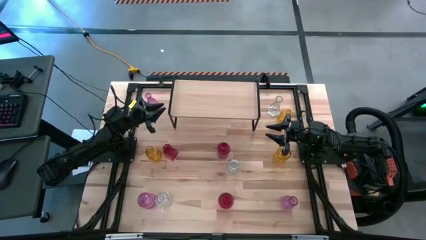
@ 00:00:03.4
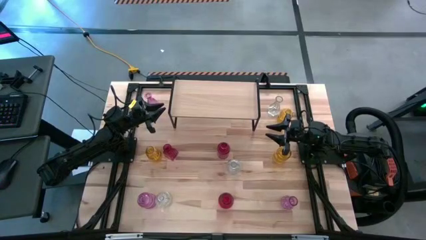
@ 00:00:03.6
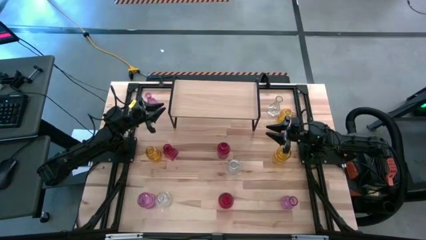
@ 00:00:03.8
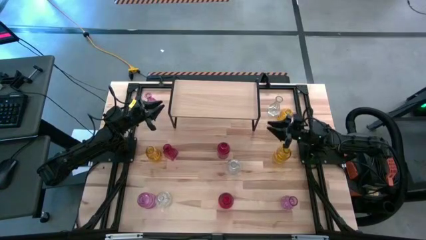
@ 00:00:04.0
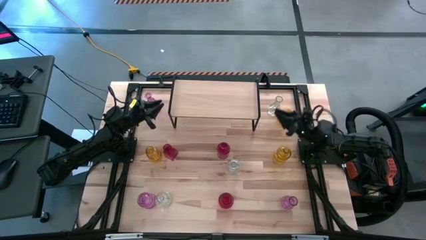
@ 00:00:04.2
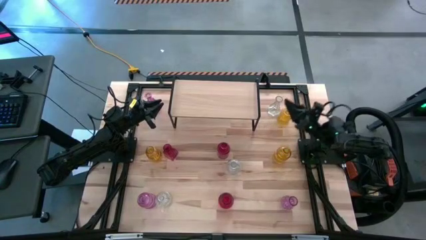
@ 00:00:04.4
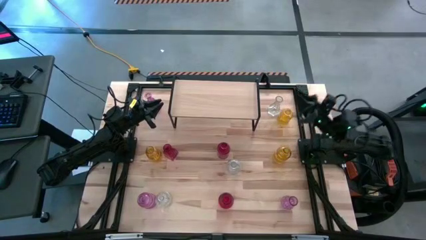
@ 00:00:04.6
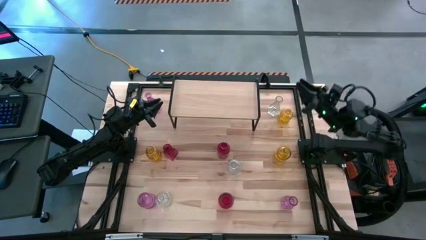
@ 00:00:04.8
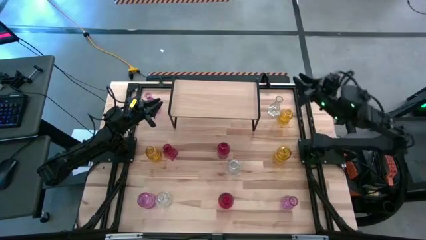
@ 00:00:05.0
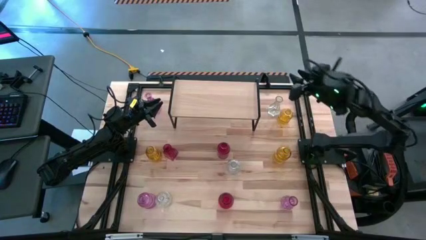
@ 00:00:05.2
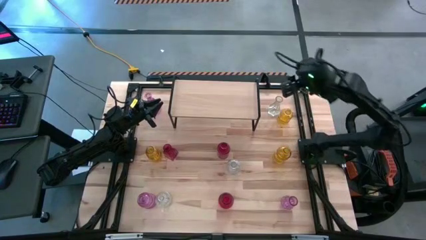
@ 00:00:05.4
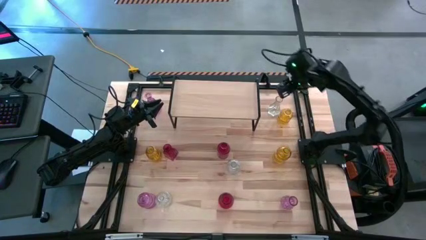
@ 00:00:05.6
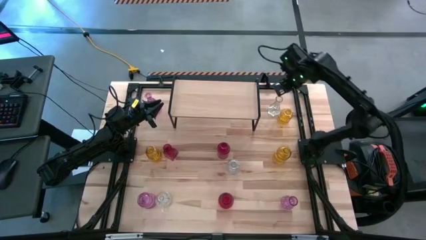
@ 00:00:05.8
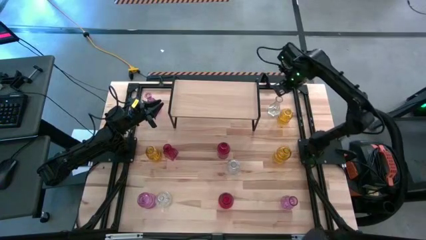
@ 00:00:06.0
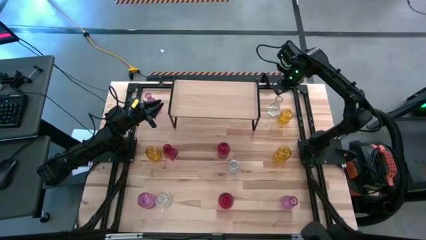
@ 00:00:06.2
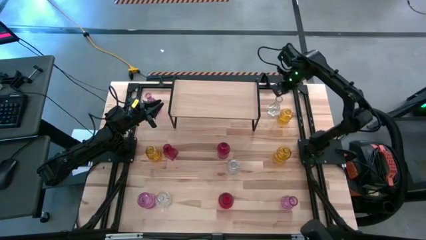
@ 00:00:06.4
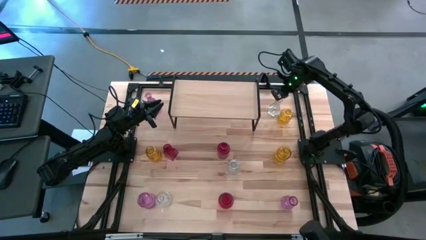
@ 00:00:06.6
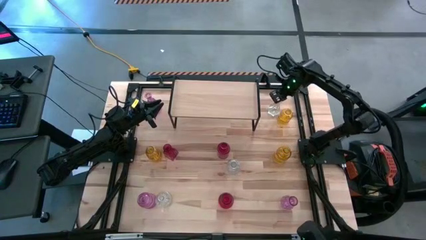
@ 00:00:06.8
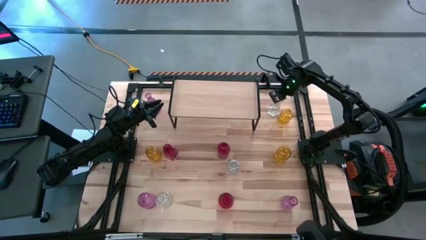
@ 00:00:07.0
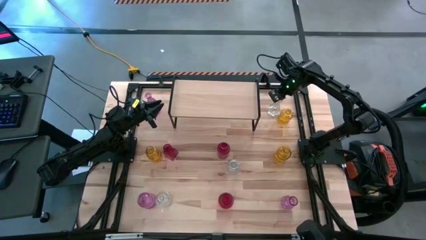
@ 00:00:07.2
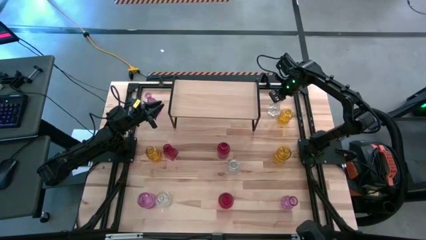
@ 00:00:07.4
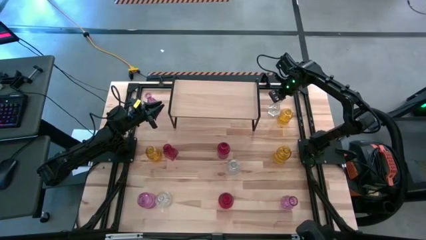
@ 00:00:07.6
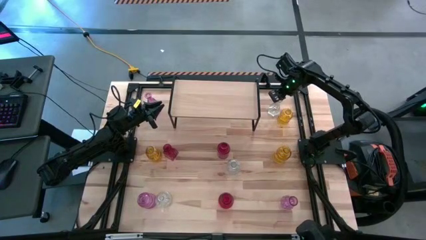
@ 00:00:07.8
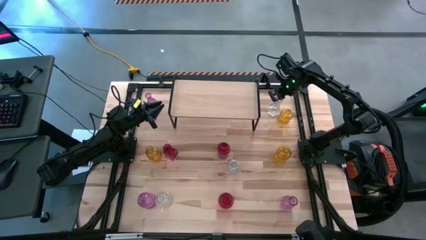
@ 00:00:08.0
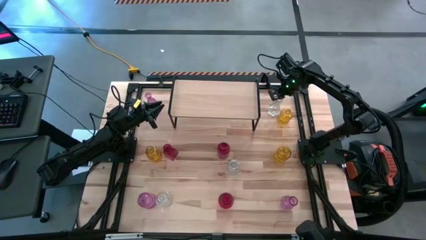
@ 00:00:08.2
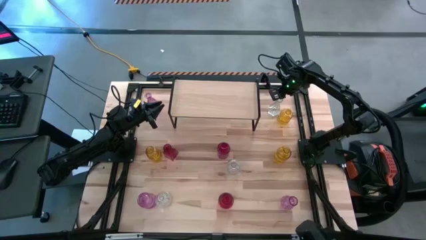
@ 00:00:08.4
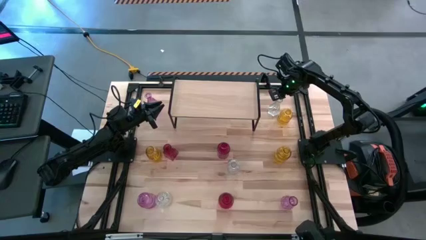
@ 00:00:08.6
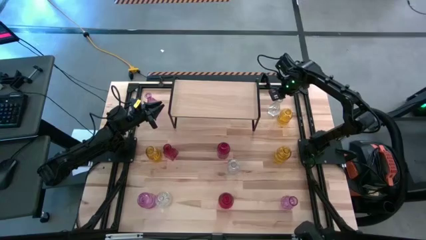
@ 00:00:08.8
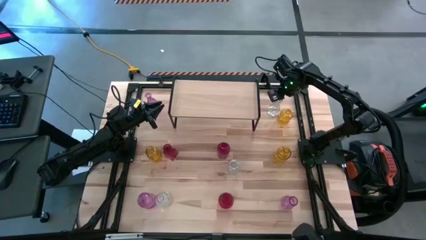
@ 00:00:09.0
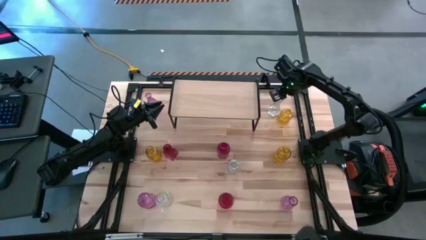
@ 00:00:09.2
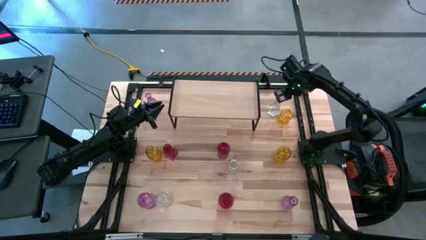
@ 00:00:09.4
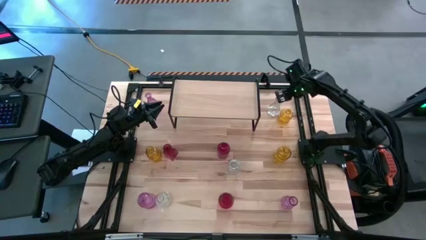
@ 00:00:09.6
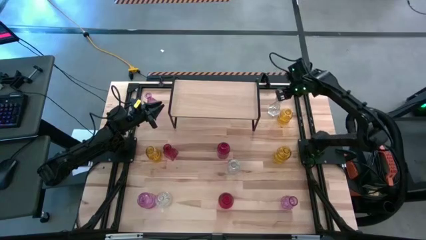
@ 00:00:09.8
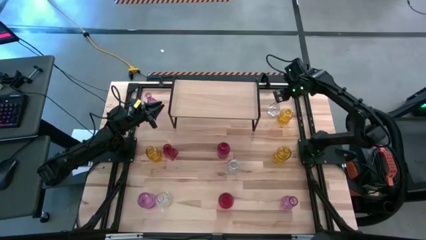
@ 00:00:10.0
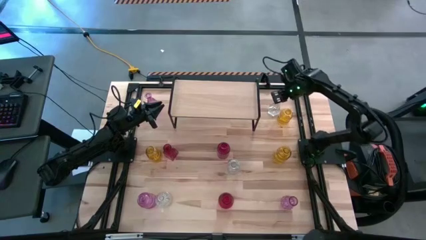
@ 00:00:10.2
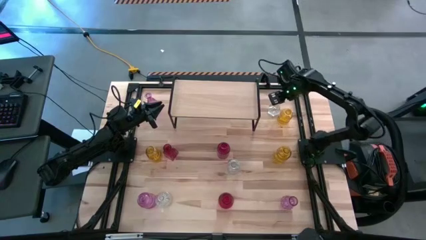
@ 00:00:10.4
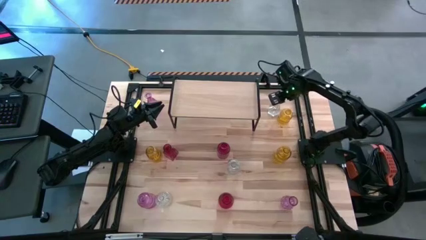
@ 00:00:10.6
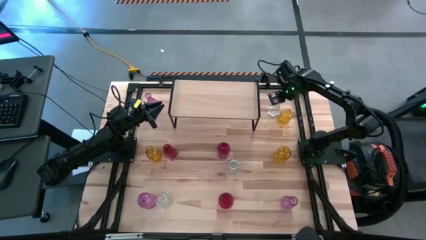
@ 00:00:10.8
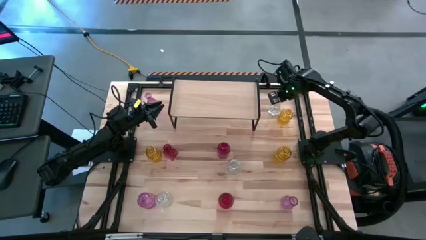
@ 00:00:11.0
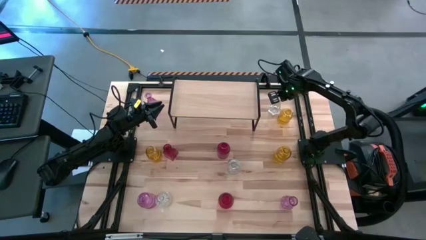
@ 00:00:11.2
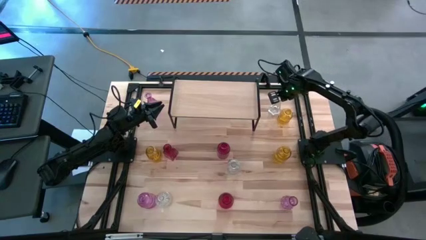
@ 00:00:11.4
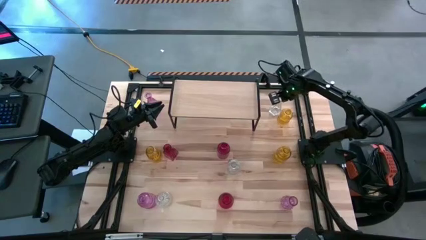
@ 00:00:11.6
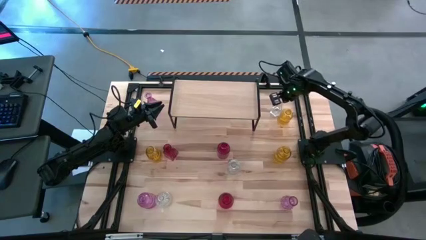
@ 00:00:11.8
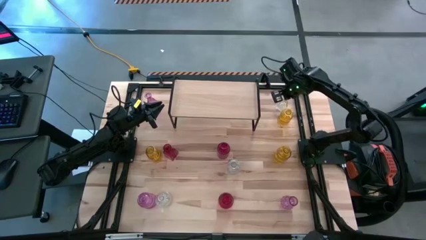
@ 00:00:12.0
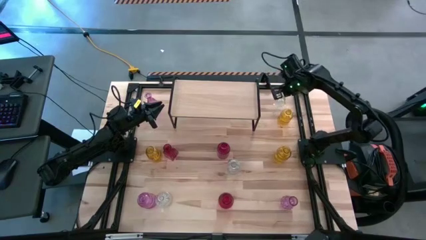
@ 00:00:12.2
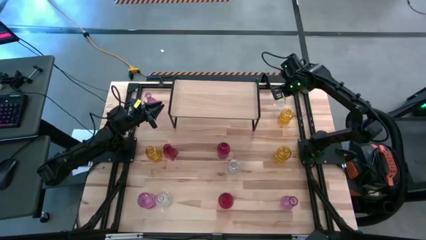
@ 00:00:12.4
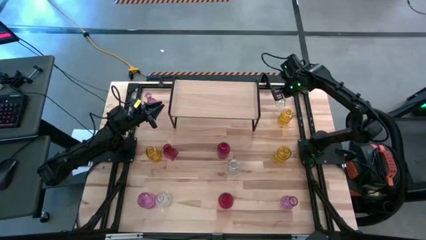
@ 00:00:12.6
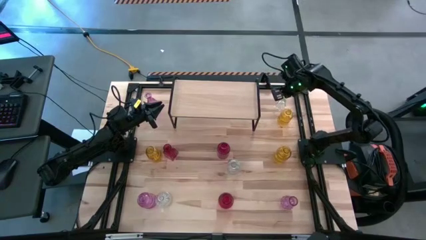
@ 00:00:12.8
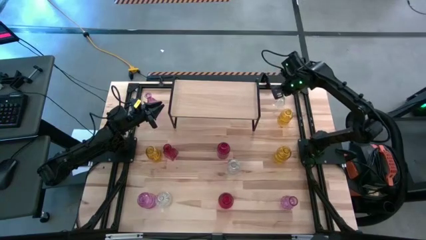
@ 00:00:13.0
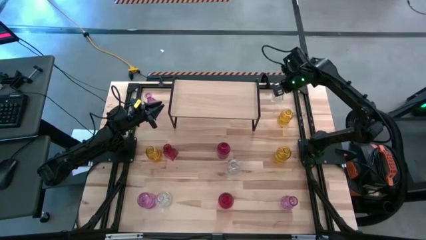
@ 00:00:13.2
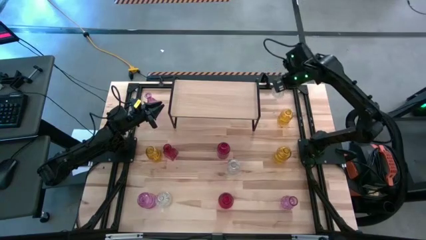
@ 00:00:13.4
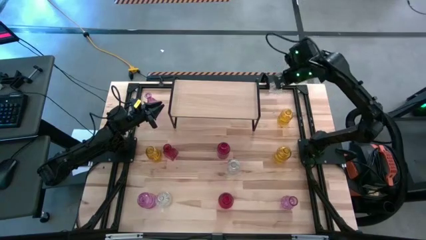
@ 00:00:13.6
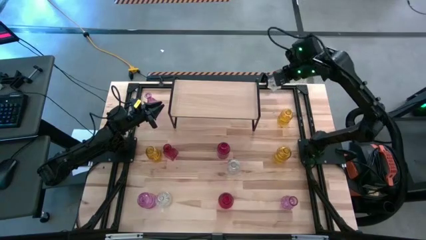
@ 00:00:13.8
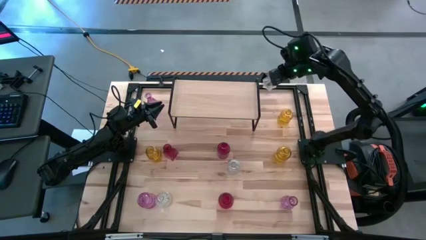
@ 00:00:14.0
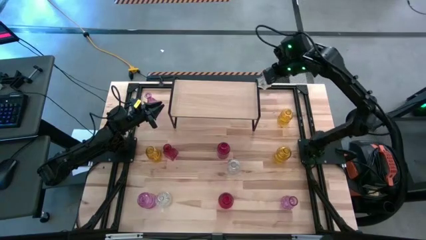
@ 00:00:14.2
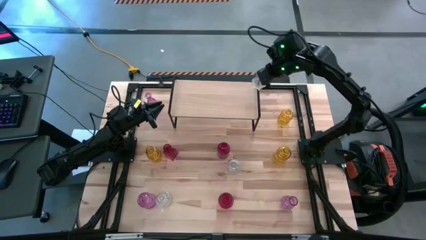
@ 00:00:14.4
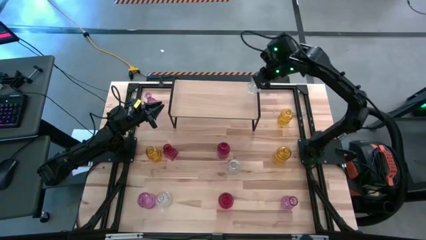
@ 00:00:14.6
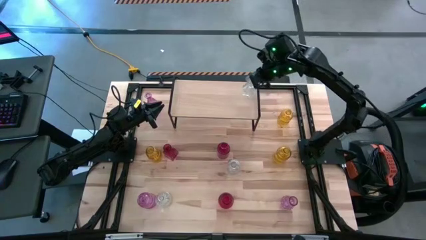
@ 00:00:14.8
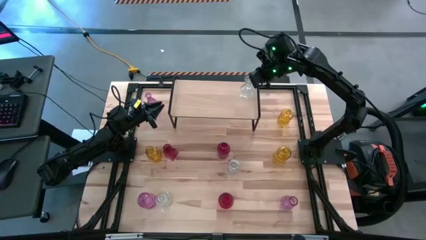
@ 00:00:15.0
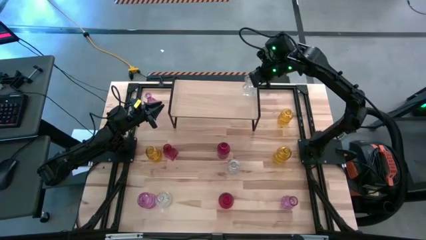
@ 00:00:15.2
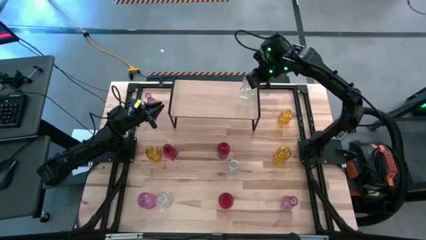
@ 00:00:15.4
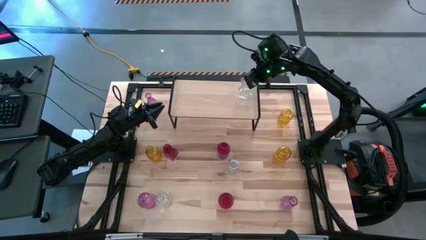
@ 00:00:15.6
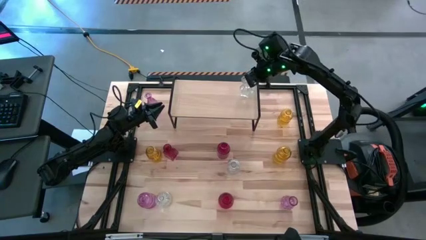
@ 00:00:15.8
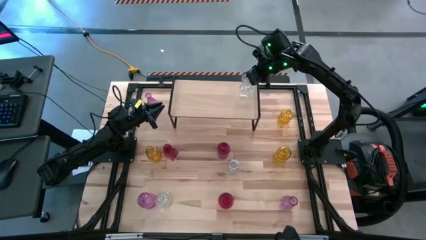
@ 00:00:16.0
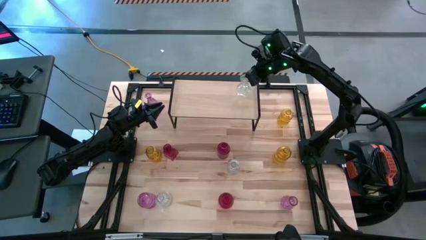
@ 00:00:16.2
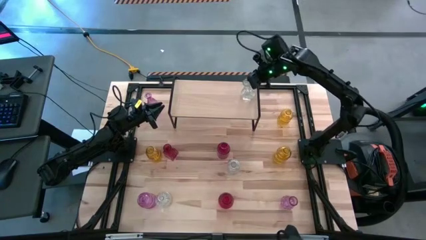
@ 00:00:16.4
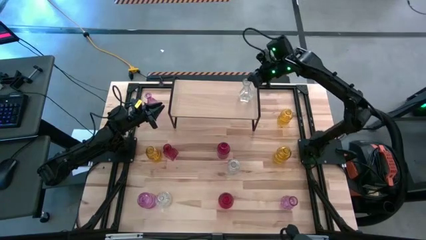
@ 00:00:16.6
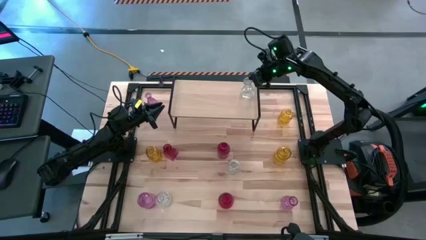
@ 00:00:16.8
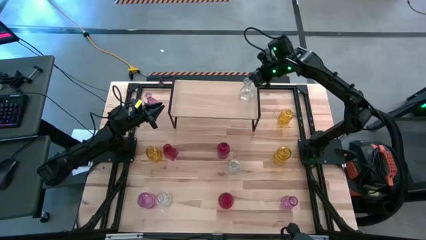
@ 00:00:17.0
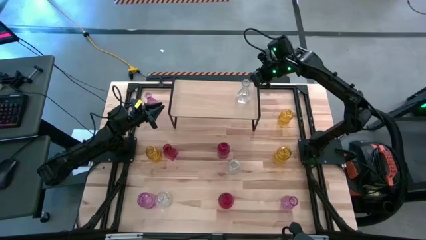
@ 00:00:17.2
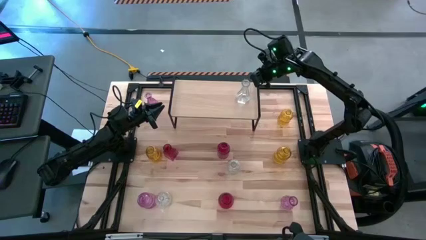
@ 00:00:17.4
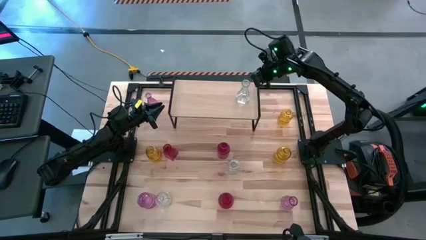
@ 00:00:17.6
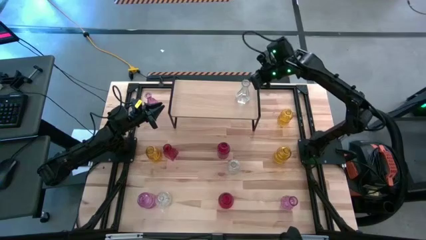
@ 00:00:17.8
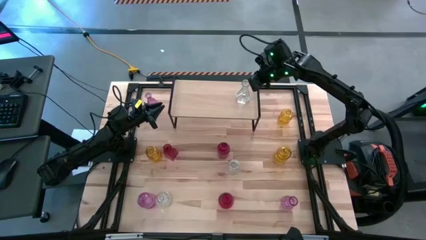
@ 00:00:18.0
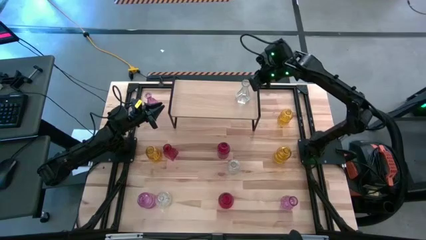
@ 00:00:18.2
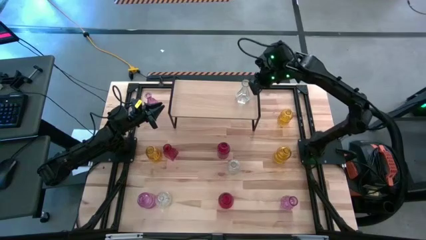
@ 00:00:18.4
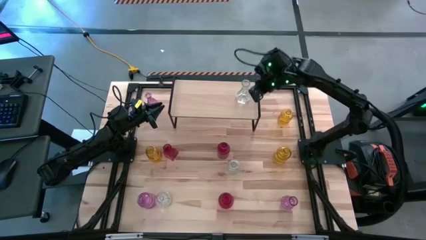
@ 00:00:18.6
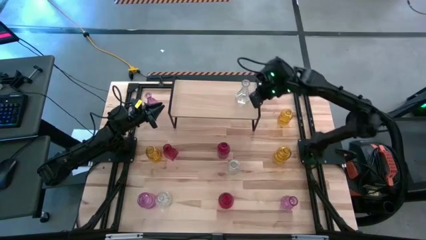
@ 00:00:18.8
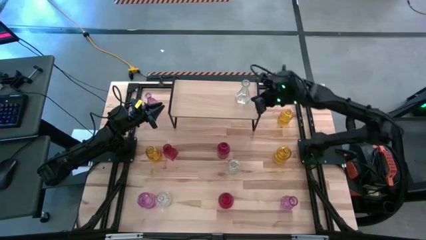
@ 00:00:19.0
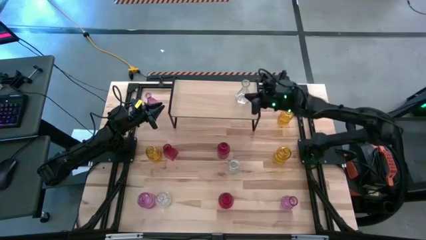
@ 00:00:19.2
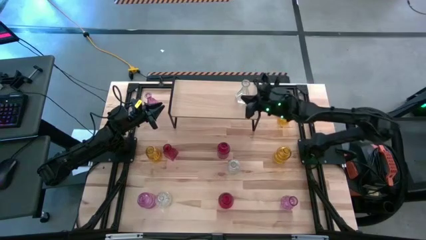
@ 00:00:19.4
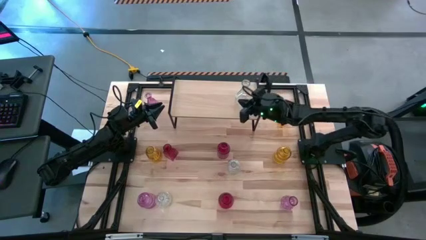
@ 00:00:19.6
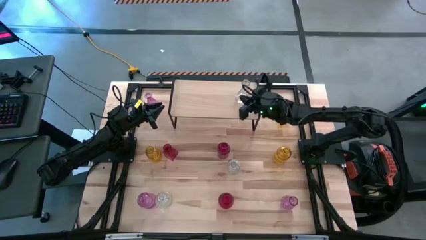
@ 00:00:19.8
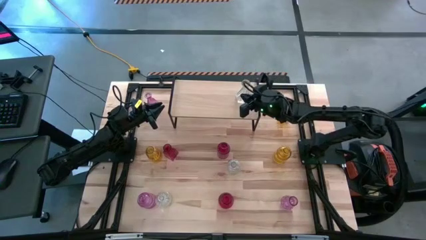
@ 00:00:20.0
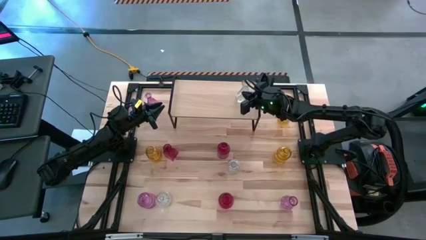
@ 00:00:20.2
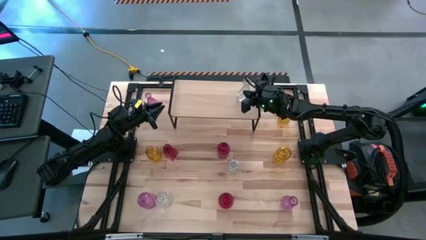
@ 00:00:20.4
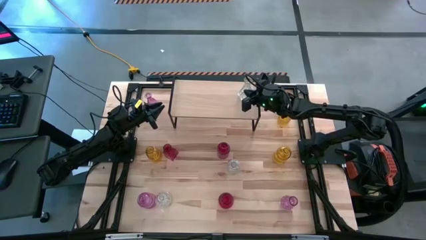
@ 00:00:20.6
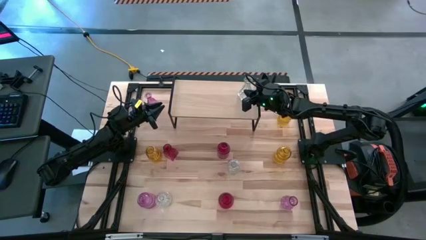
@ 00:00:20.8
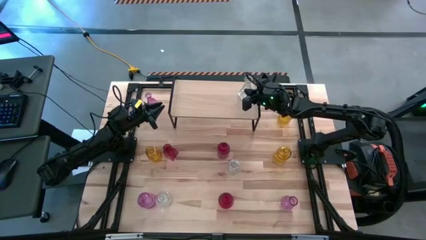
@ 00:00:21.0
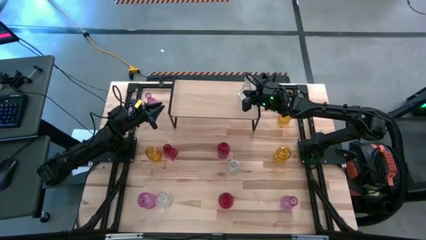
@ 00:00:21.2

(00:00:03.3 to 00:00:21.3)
Task: sort vases onto shelf
Put the top transparent vase on the shelf
